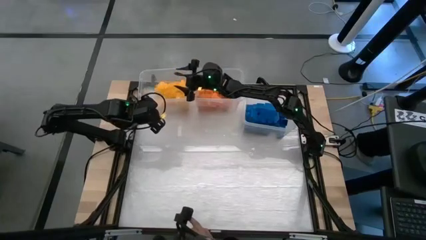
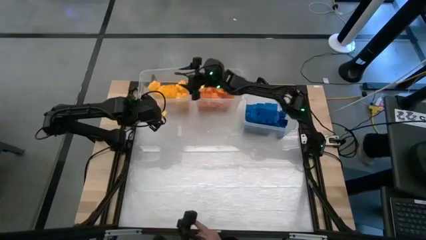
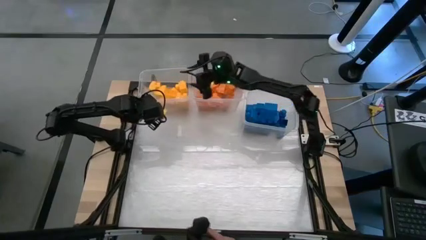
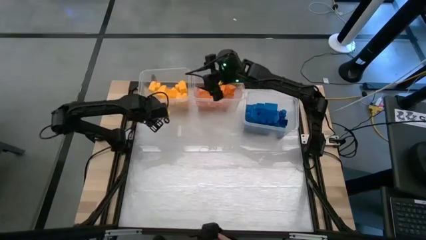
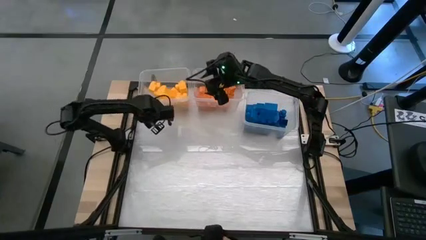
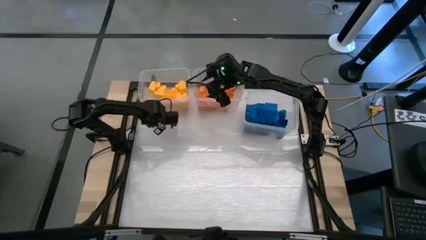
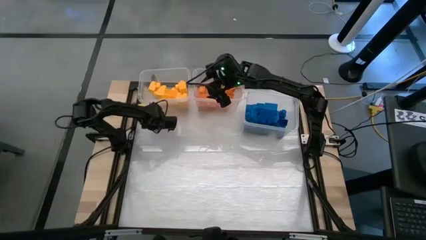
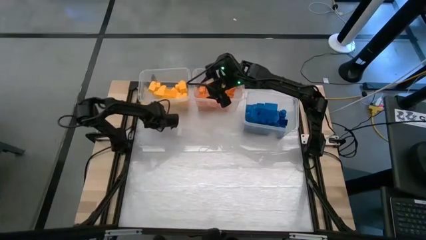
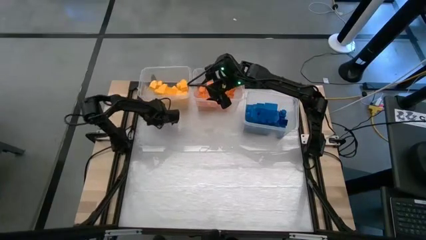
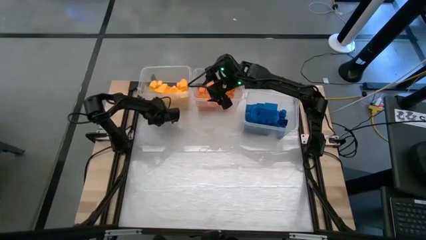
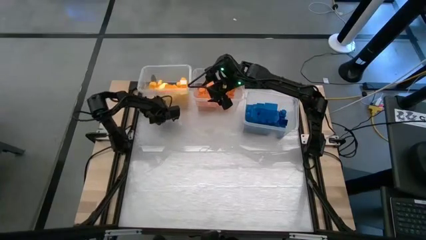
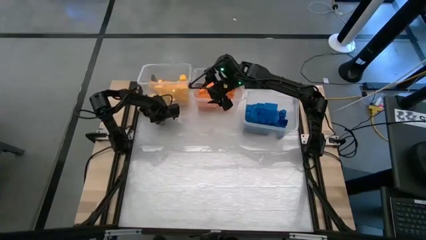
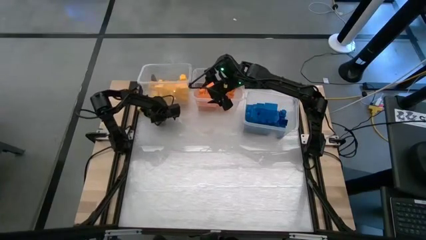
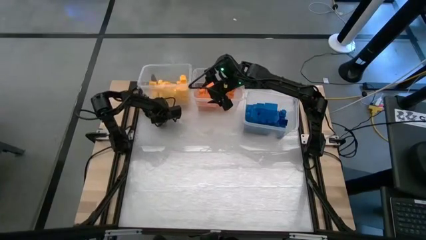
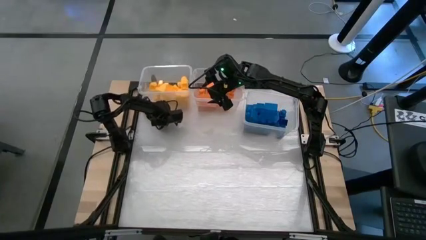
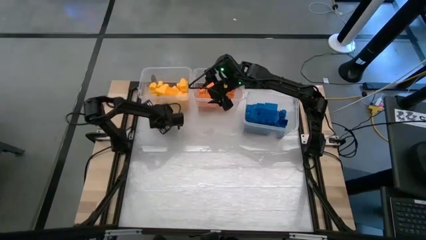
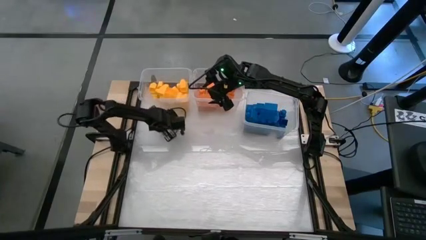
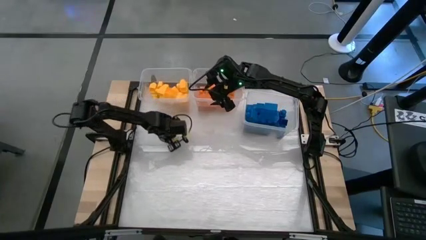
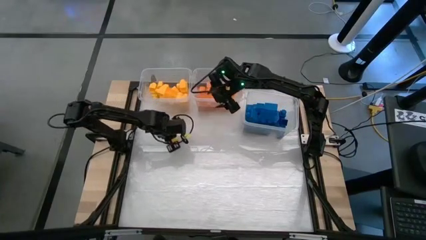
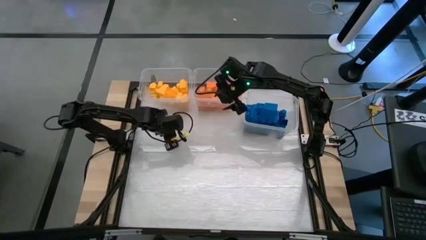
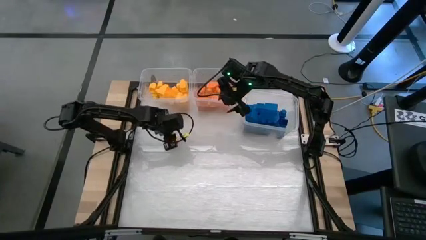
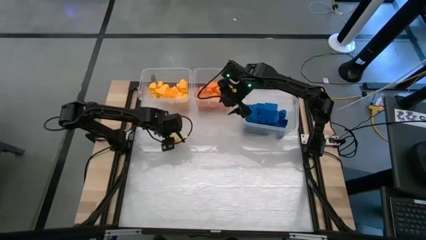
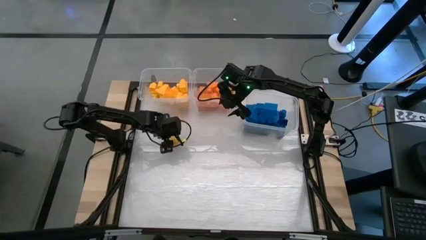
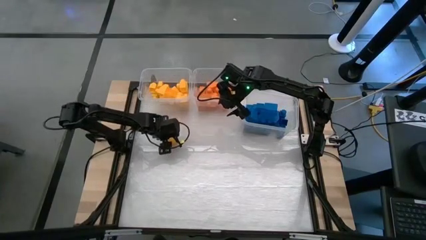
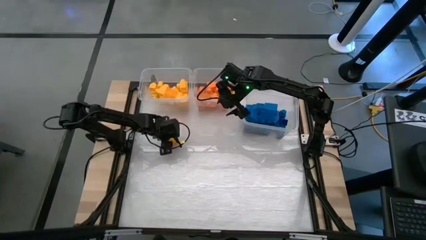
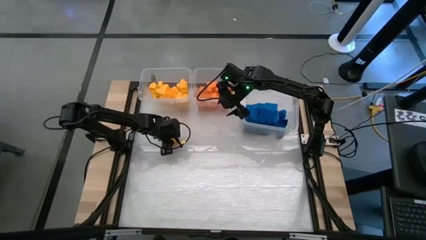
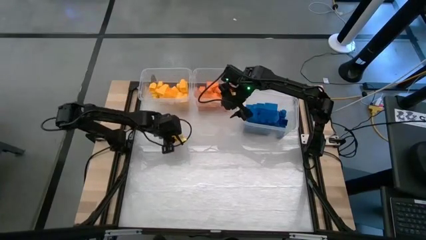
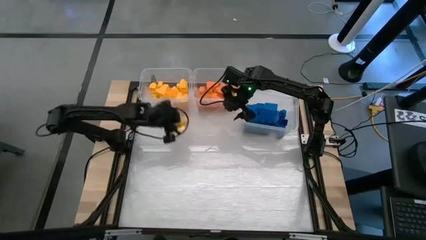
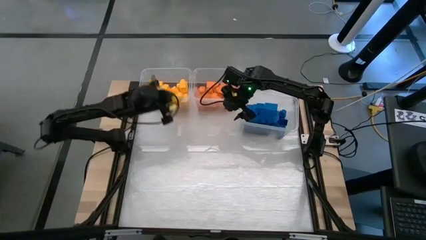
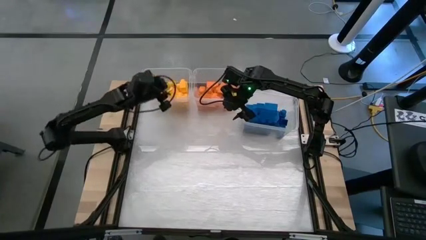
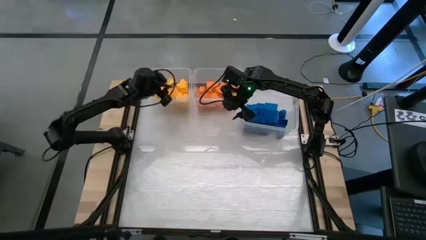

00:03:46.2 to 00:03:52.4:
Task: Sort blocks
Put the yellow game piece into the left transparent bin

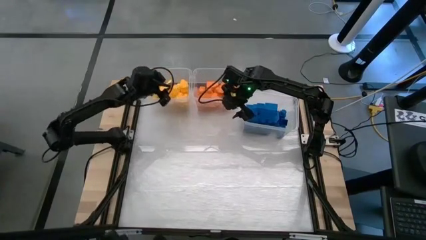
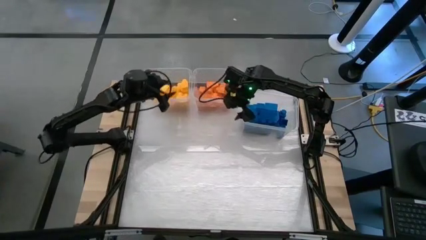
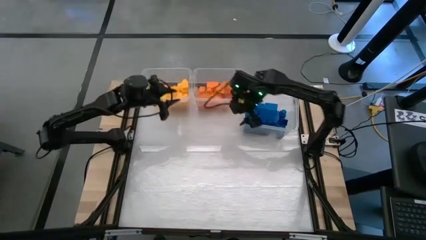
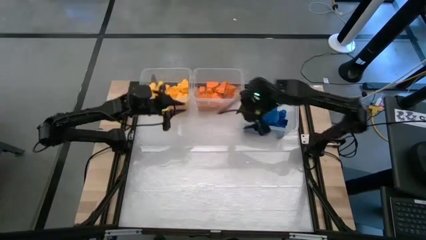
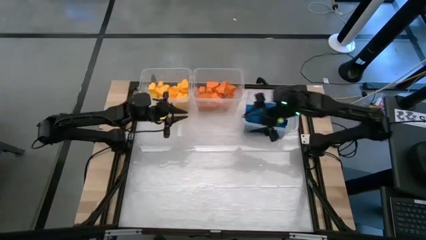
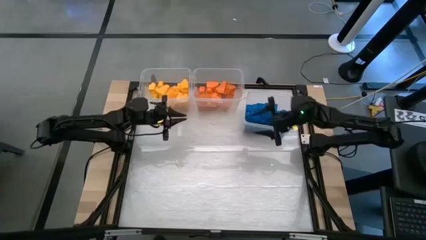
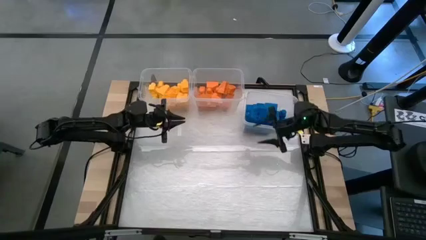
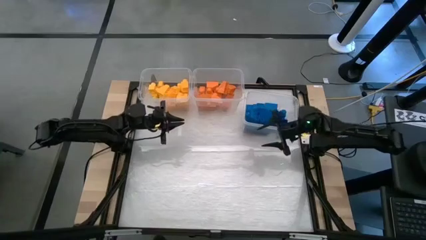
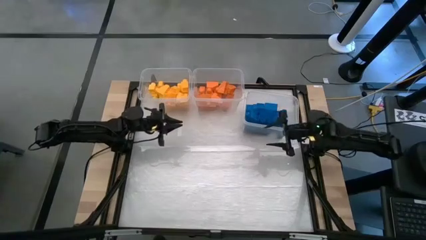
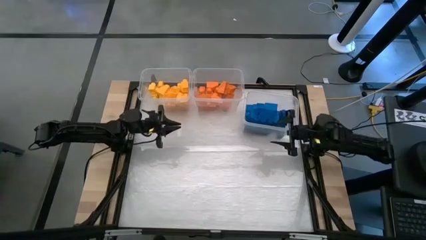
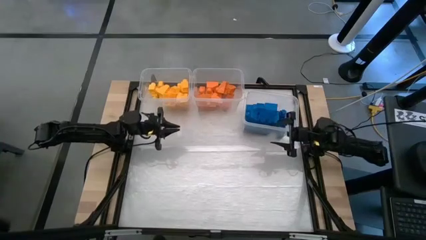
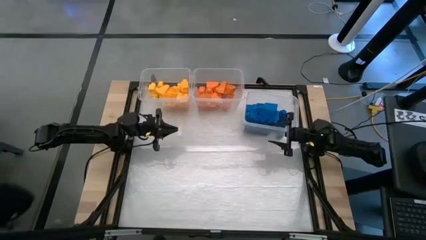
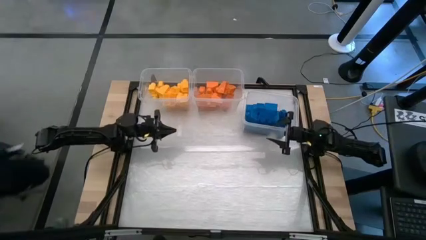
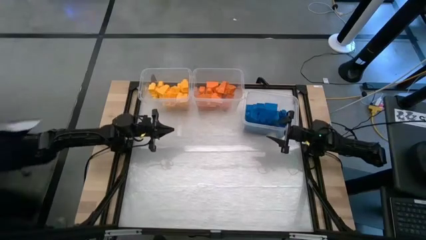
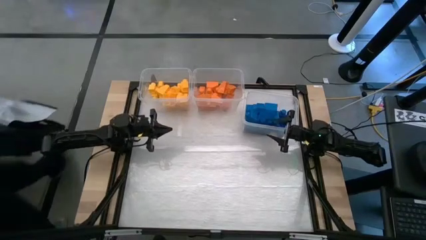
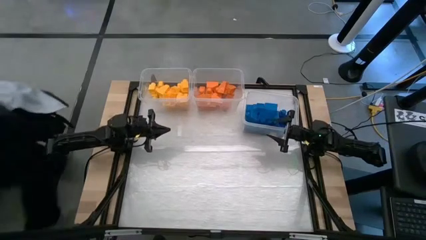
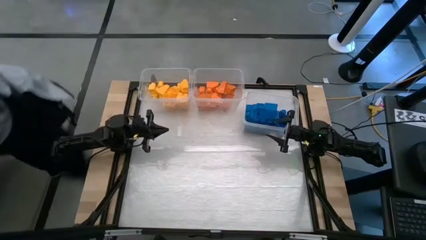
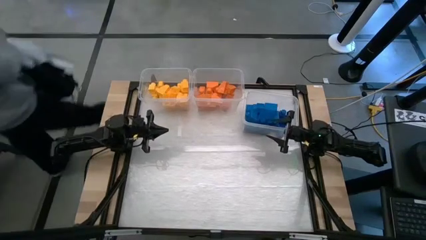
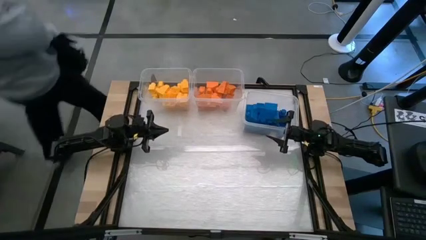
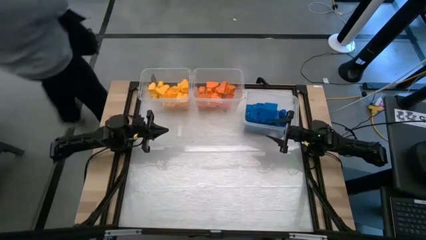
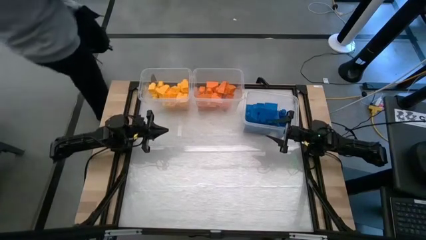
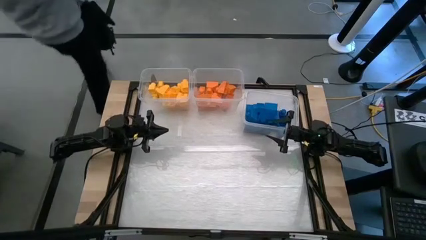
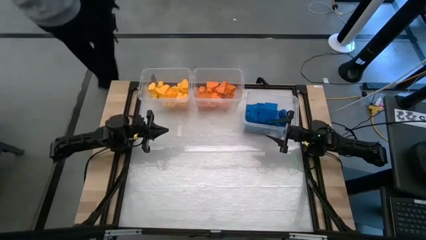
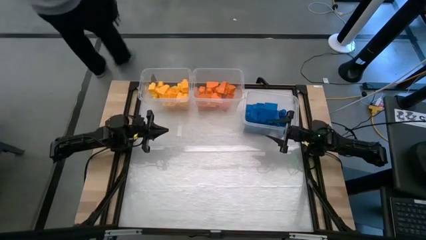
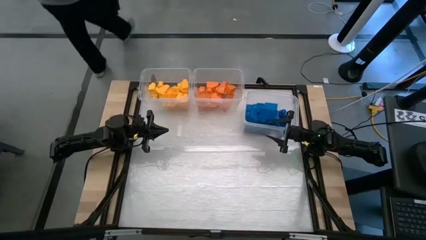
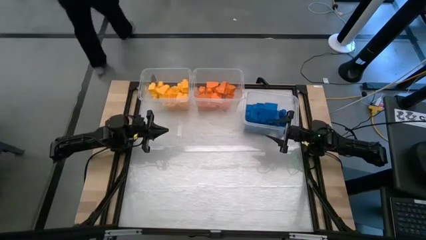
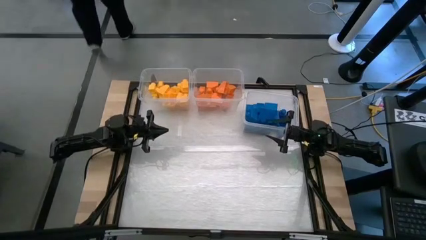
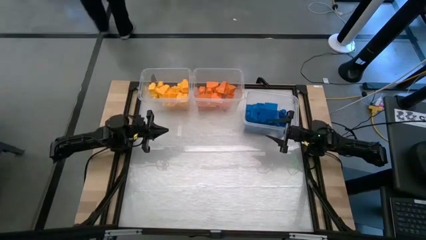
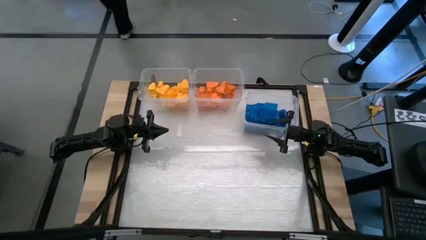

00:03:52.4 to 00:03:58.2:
Return to Home Position

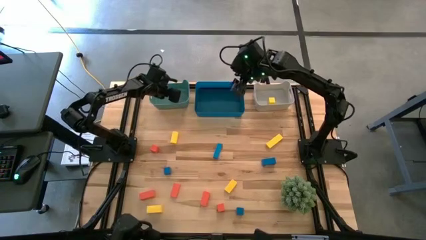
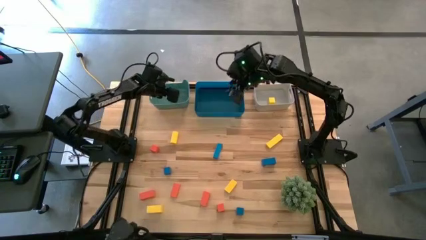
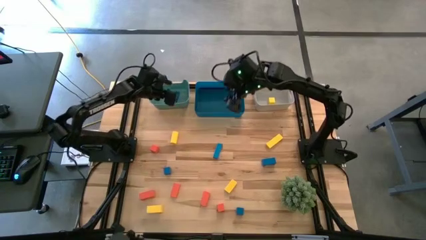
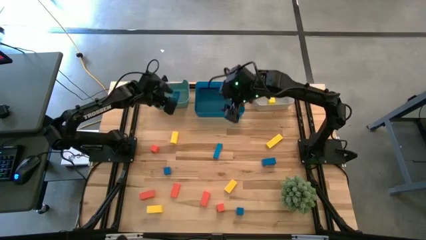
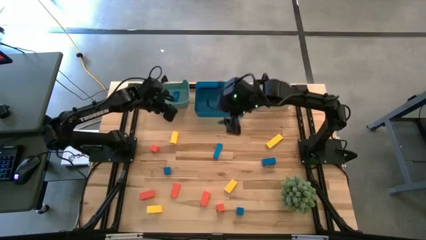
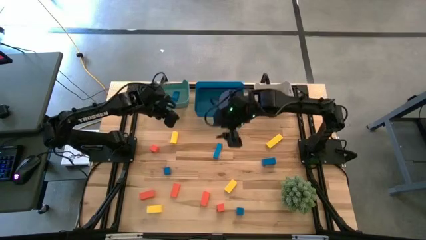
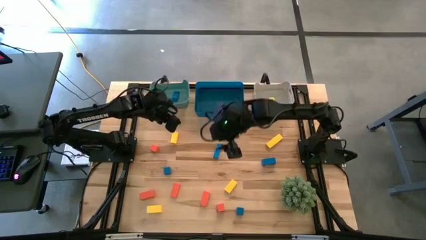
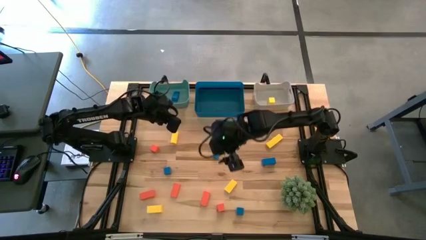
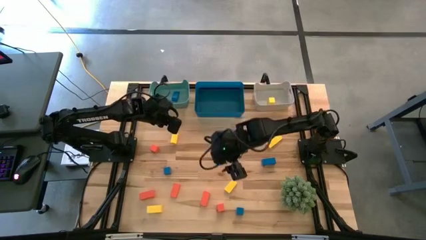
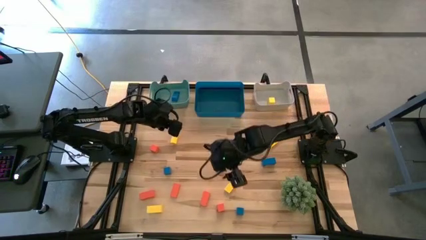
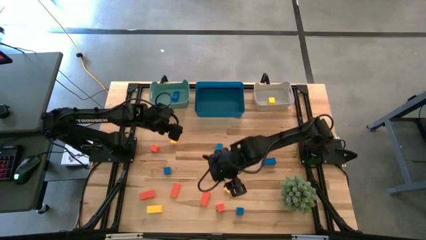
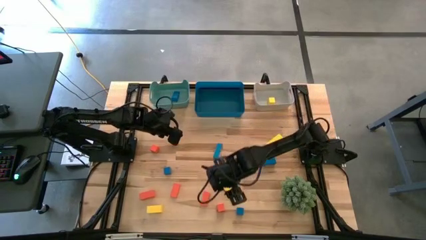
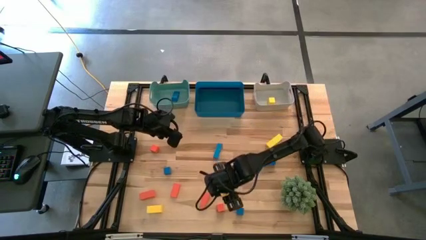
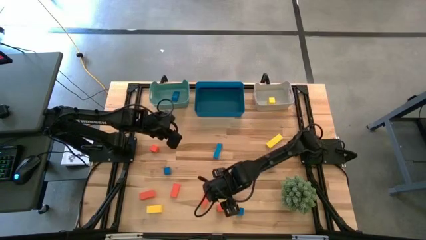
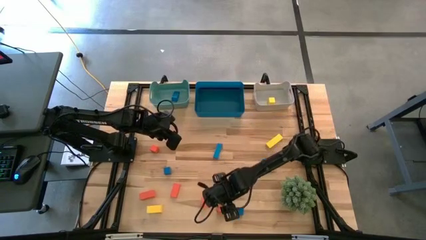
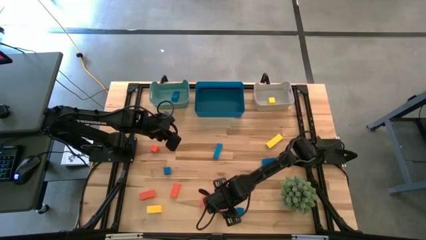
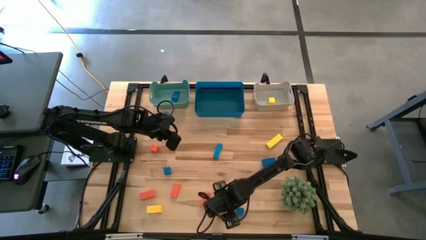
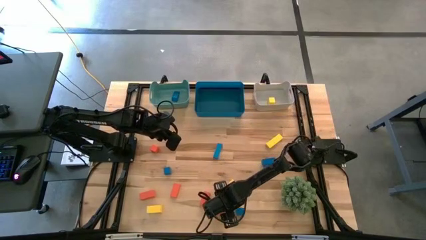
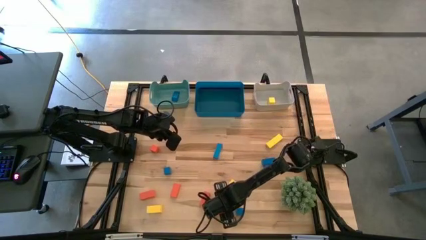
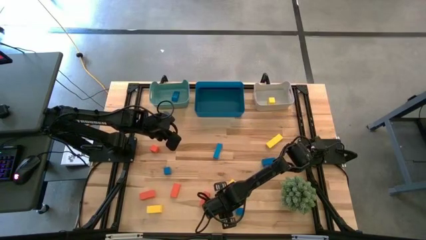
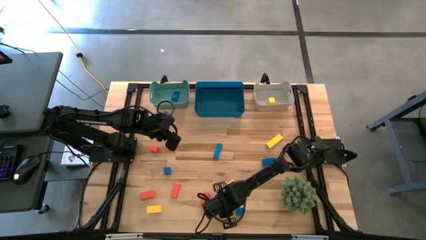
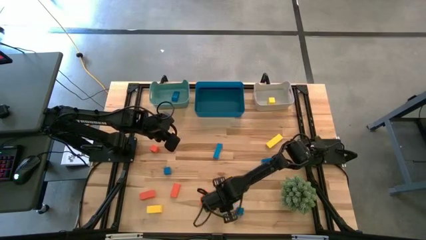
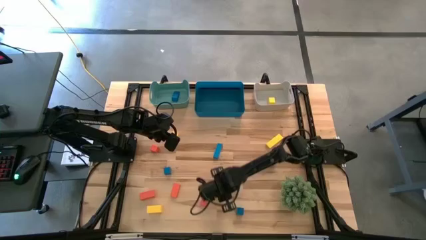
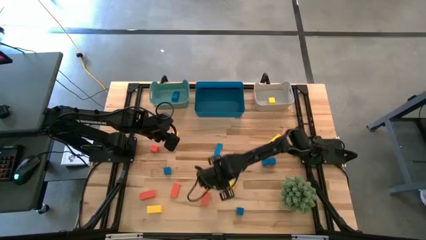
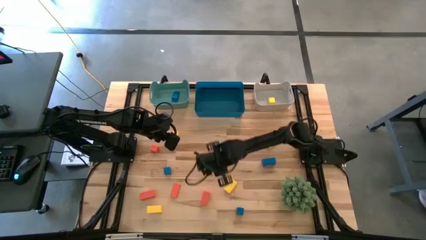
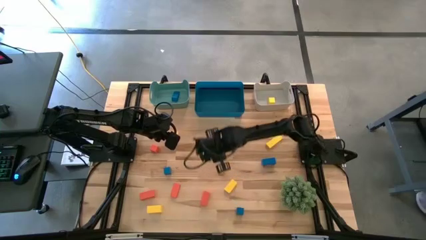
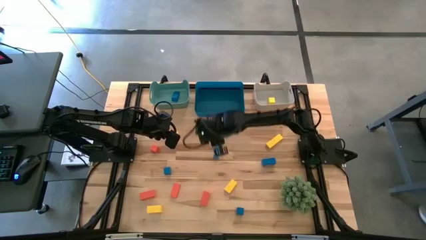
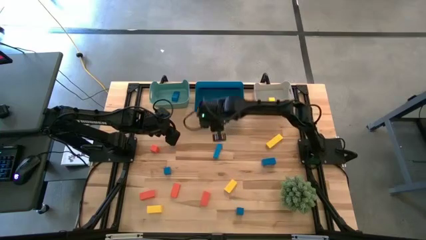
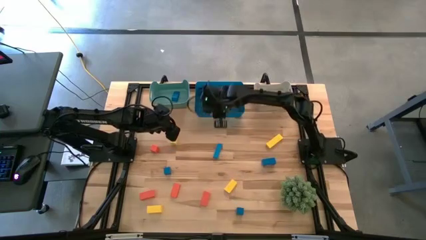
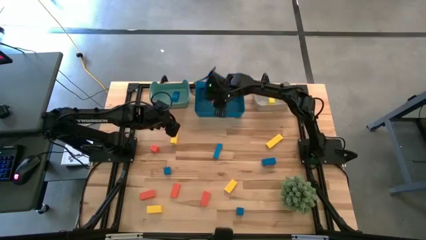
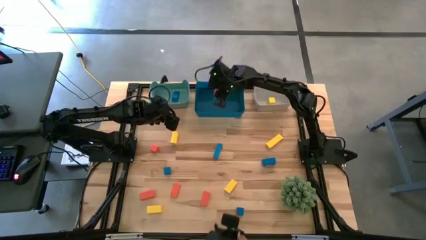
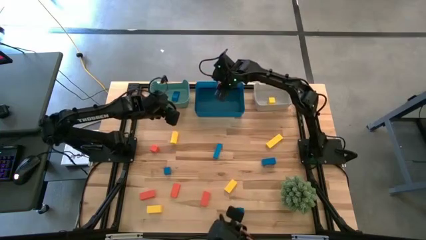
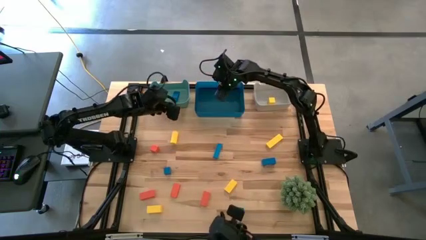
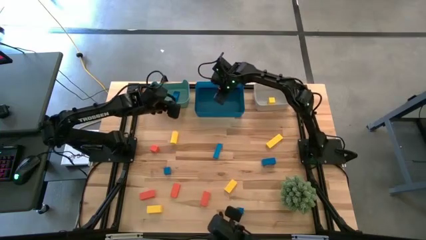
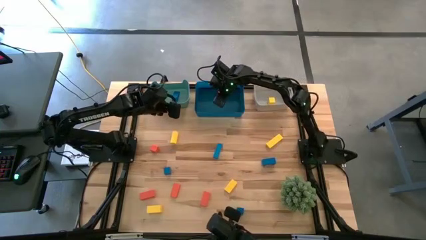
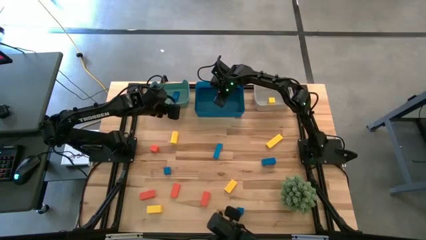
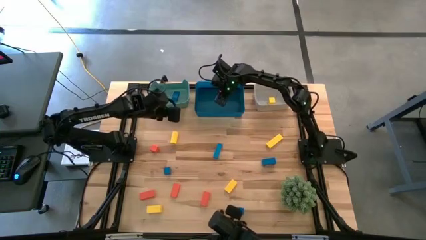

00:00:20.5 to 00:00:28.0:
Task: Sort & place blocks by color
Put the orange block into the blue bin
